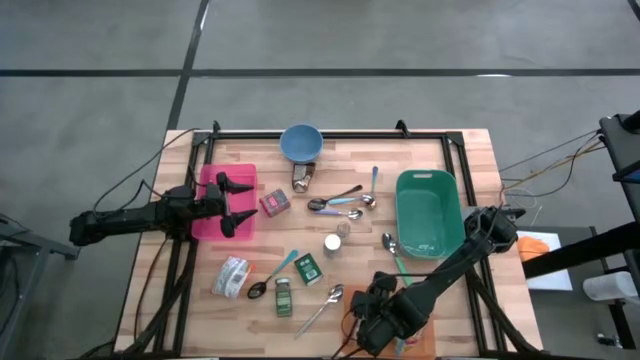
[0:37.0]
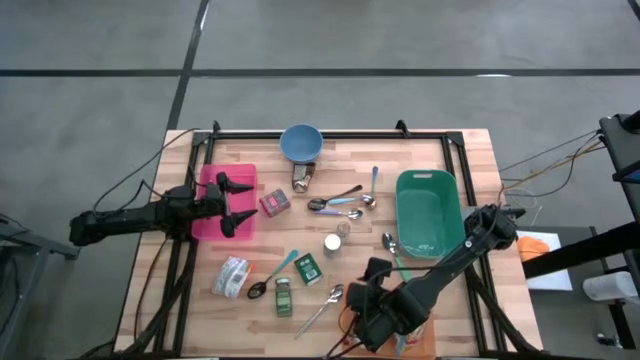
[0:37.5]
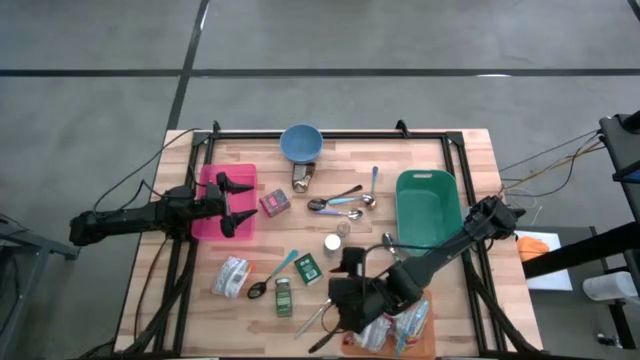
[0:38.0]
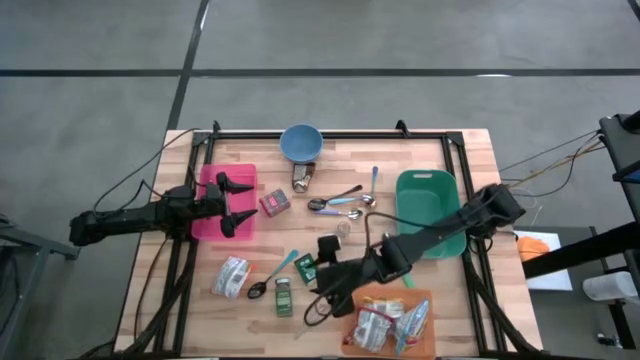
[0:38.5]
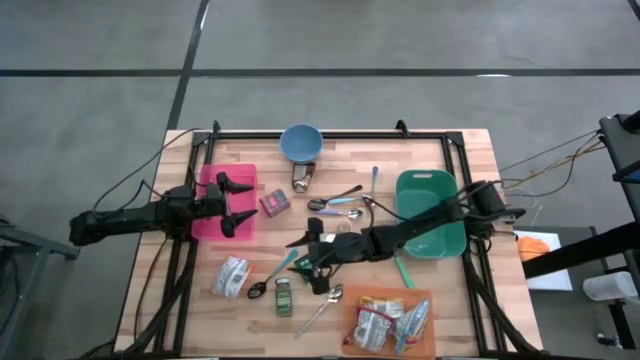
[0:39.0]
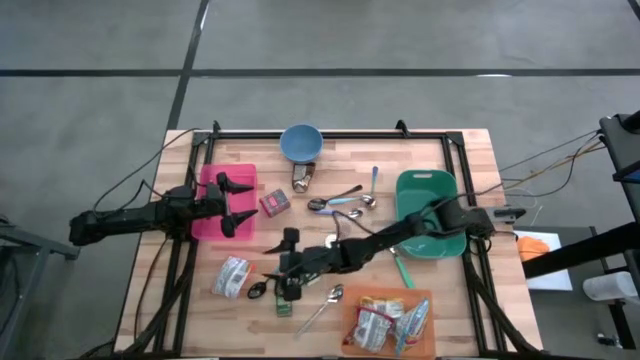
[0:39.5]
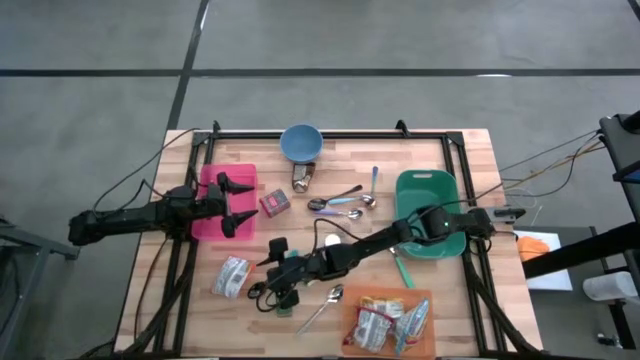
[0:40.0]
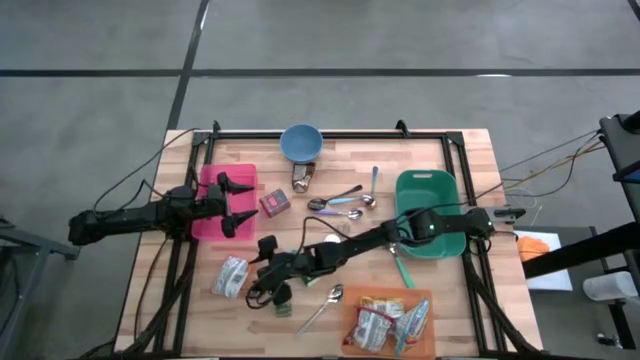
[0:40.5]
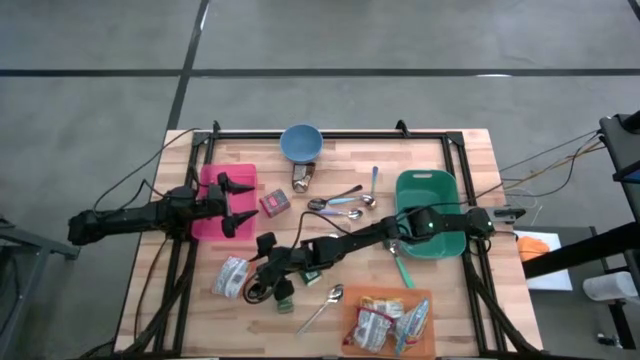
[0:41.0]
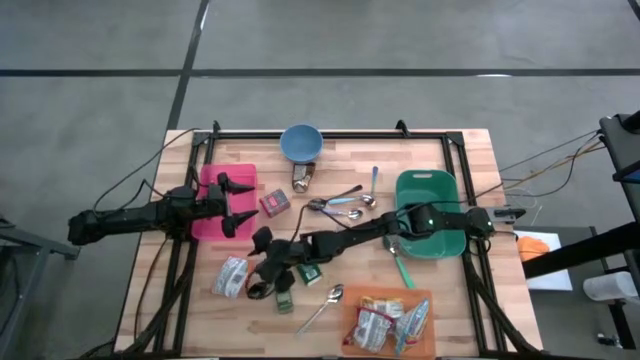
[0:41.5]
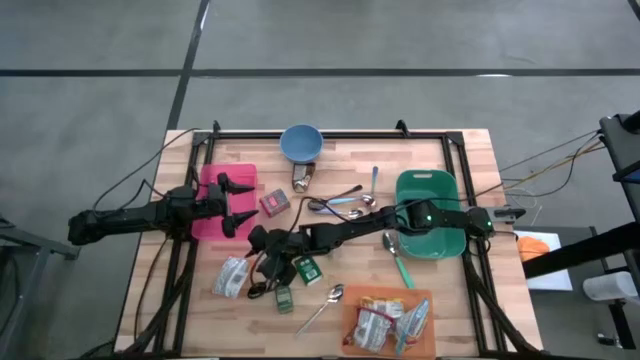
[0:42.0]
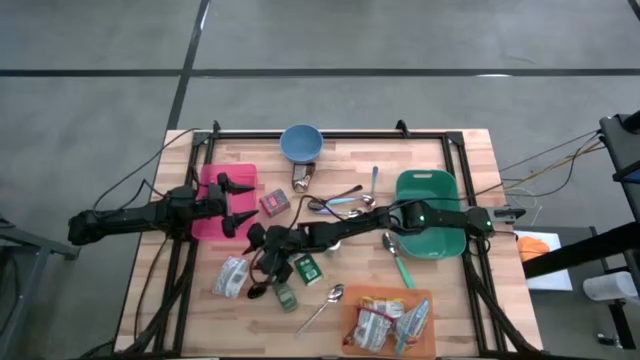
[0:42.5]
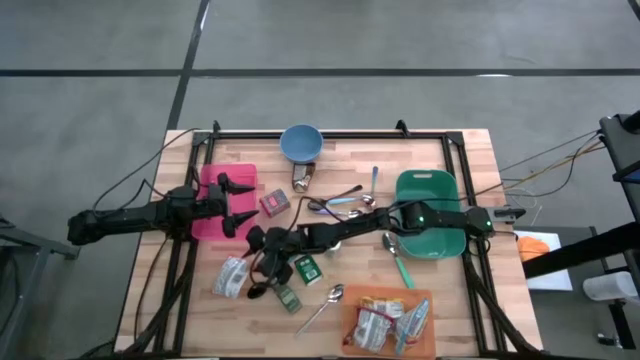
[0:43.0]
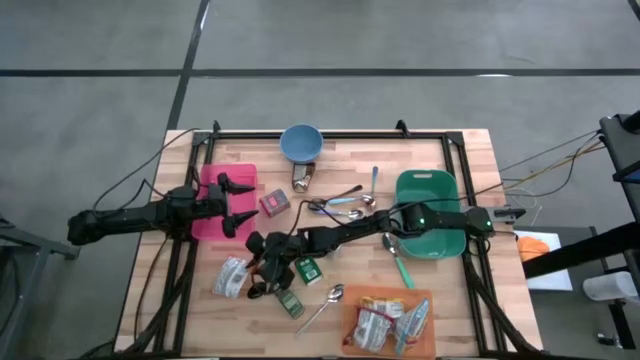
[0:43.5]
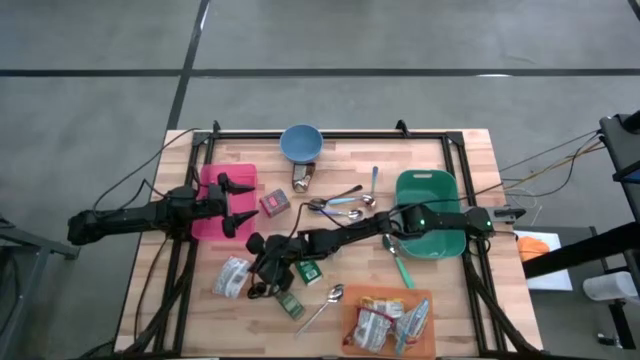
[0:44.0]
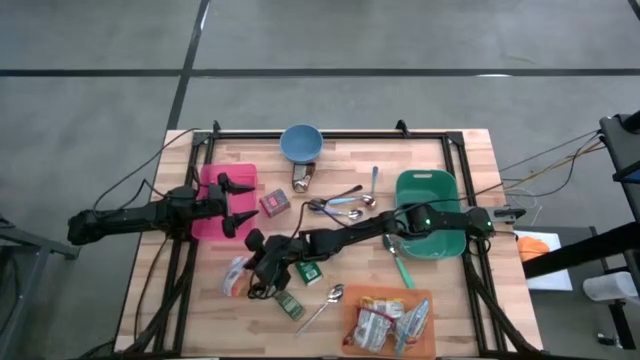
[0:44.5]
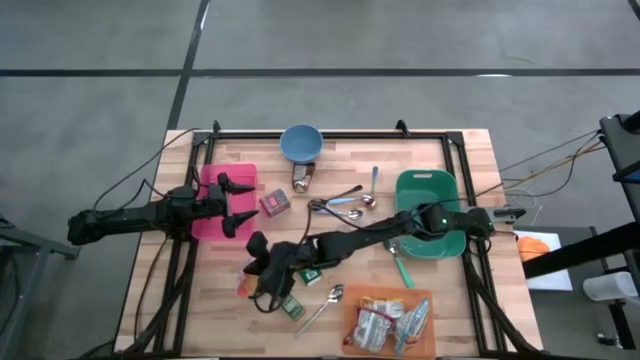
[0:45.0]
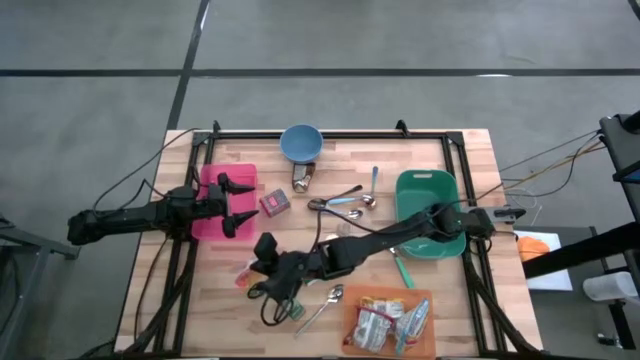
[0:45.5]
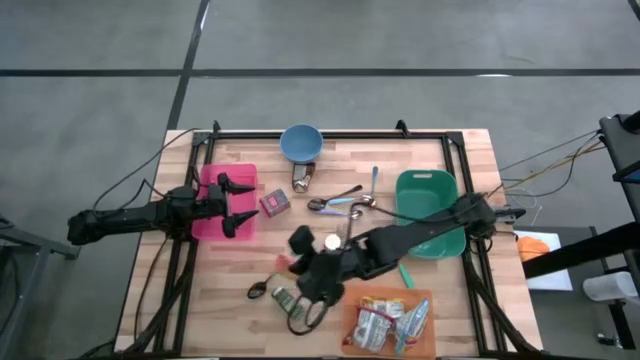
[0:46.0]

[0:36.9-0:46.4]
Put the orange noodle pack into the orange bin

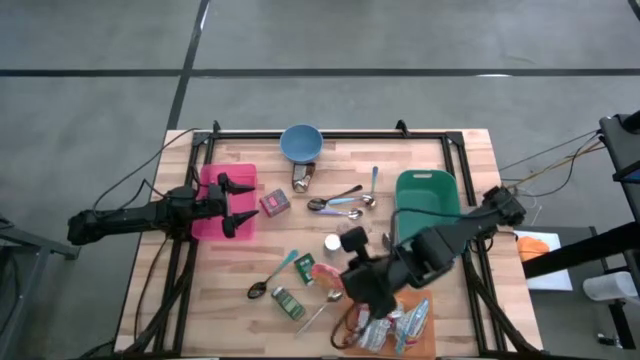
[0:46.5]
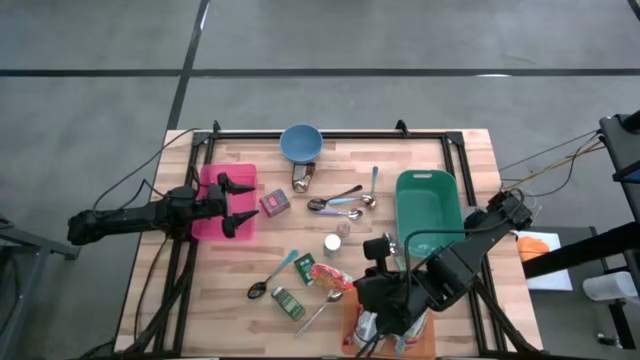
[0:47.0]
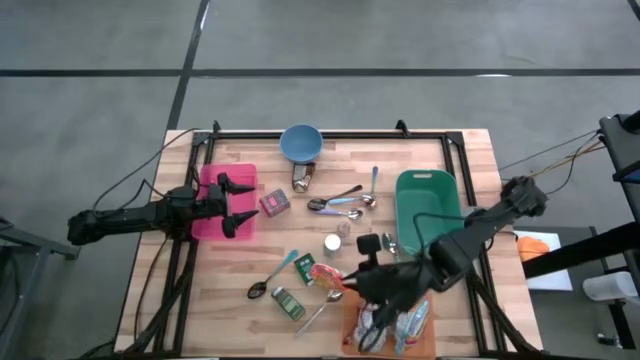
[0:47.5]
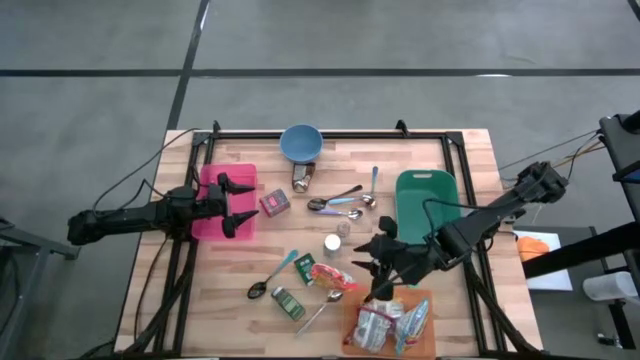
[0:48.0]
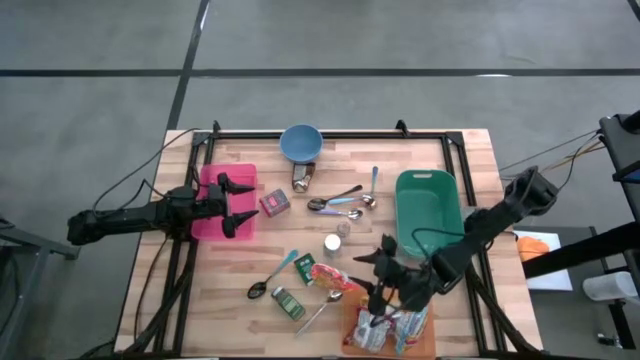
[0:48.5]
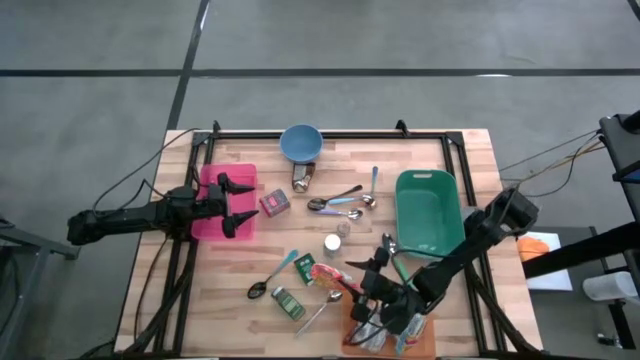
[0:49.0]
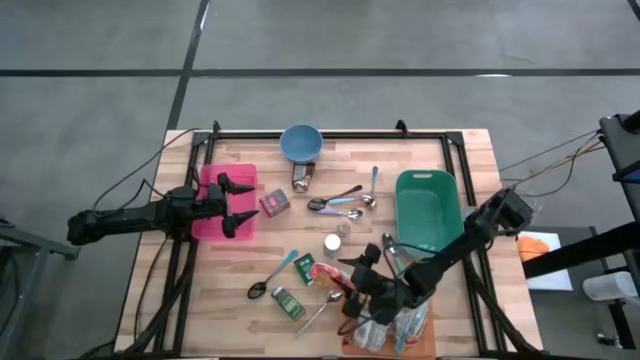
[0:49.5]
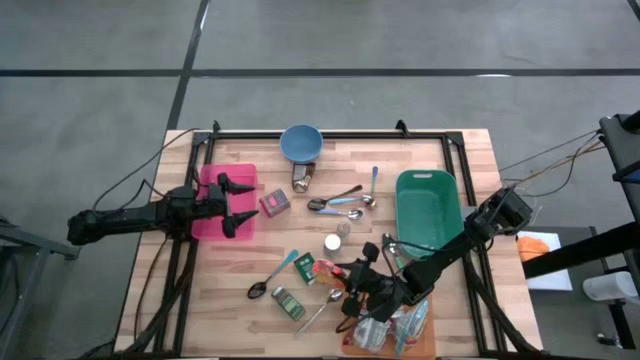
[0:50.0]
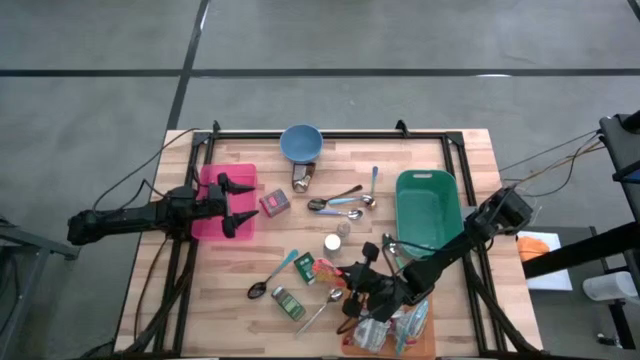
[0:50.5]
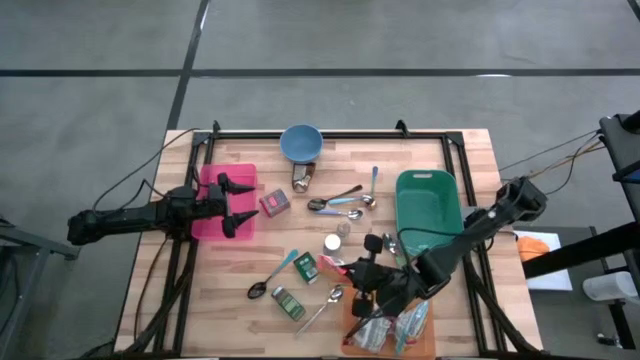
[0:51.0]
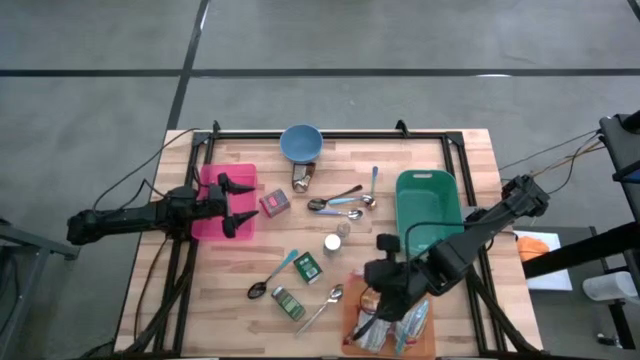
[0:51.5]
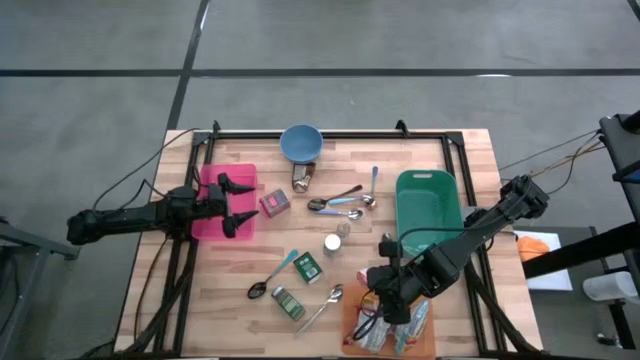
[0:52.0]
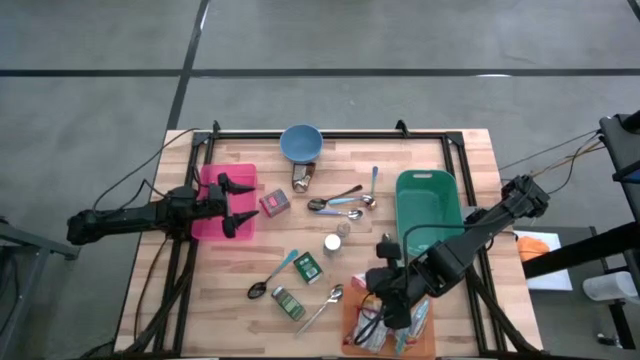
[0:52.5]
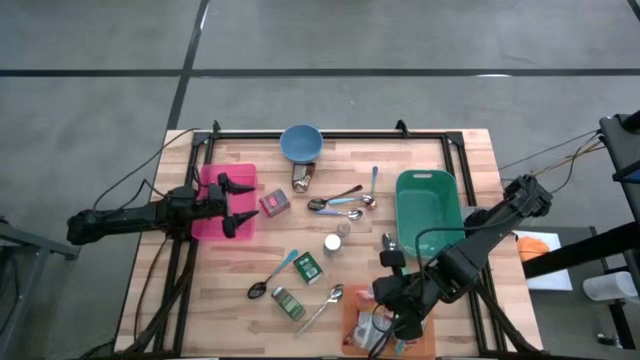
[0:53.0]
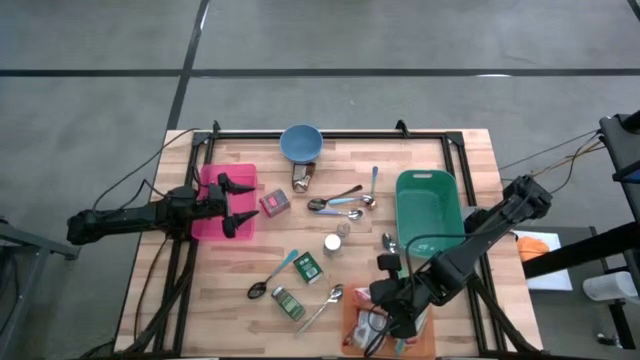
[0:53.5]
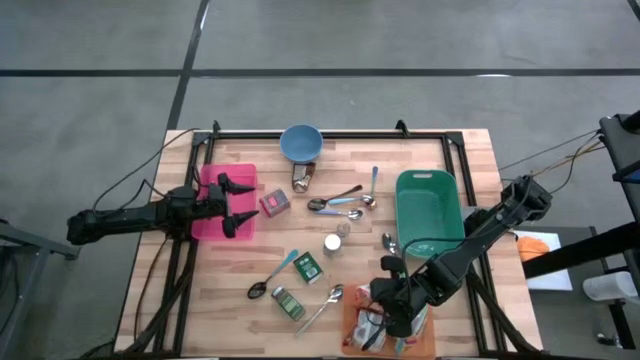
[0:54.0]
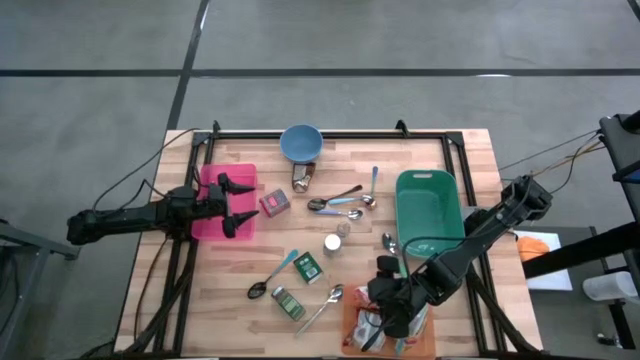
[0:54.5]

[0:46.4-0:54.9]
Put the orange noodle pack into the orange bin
